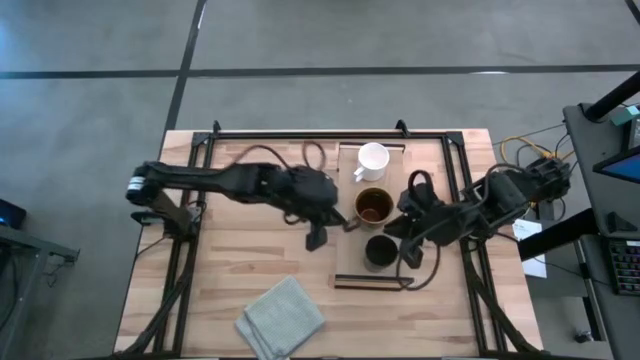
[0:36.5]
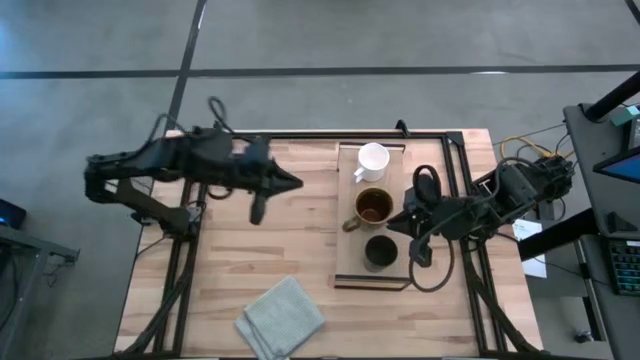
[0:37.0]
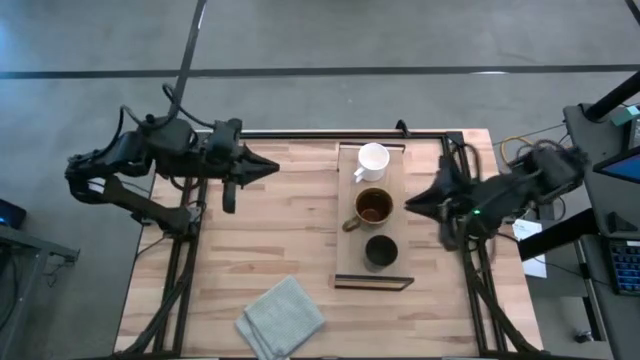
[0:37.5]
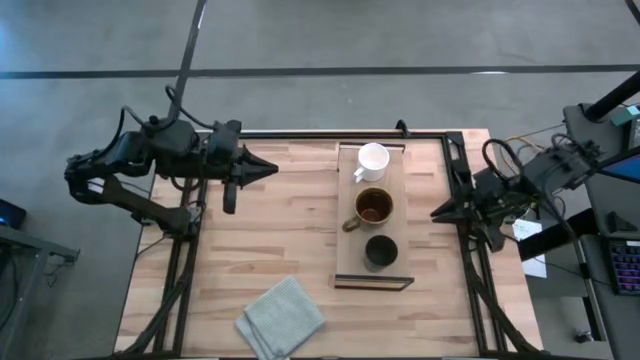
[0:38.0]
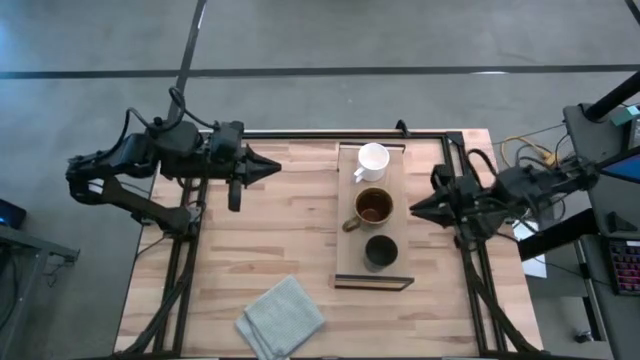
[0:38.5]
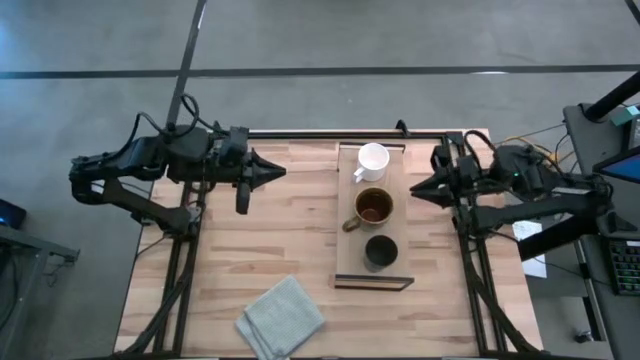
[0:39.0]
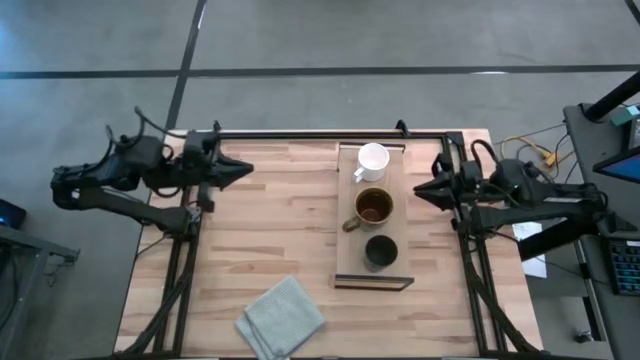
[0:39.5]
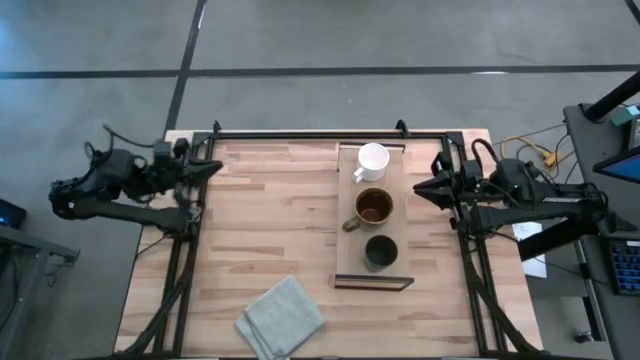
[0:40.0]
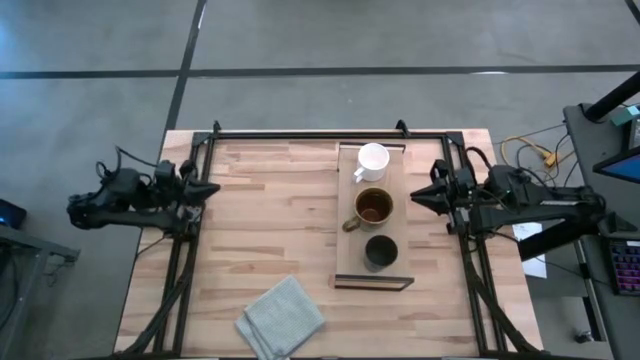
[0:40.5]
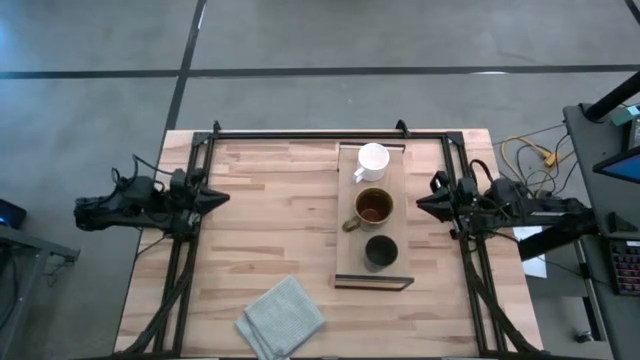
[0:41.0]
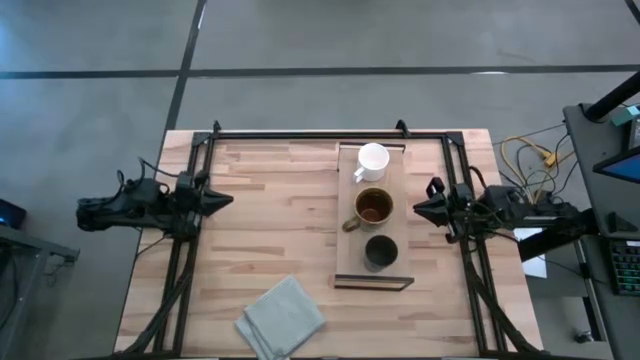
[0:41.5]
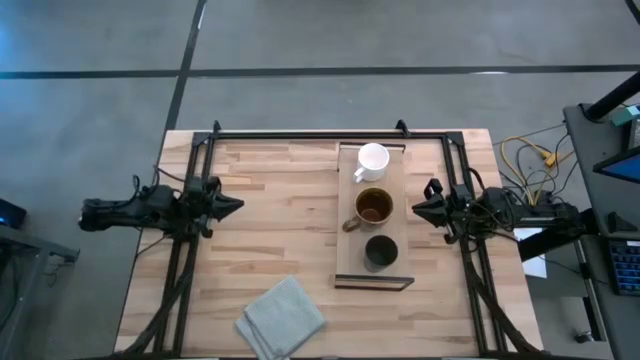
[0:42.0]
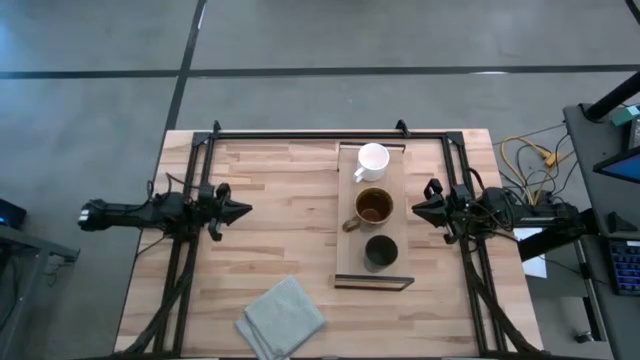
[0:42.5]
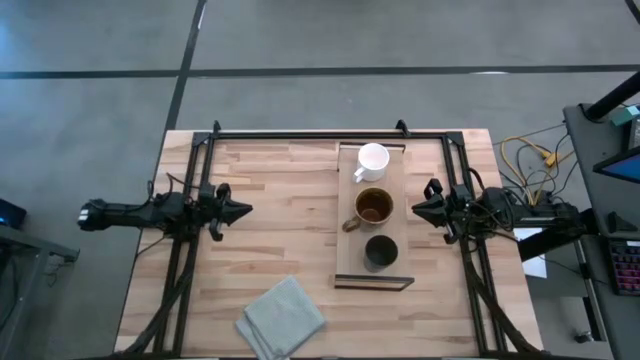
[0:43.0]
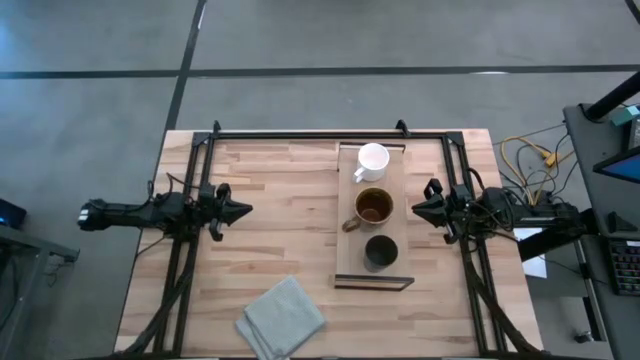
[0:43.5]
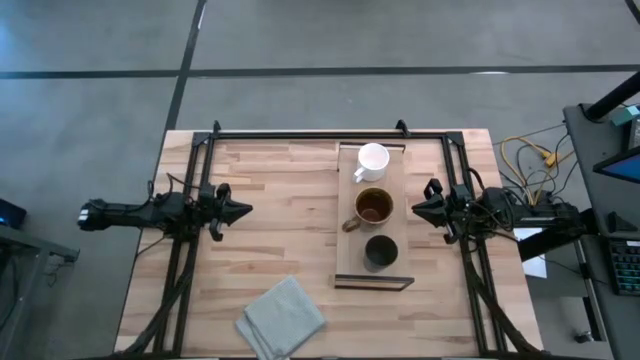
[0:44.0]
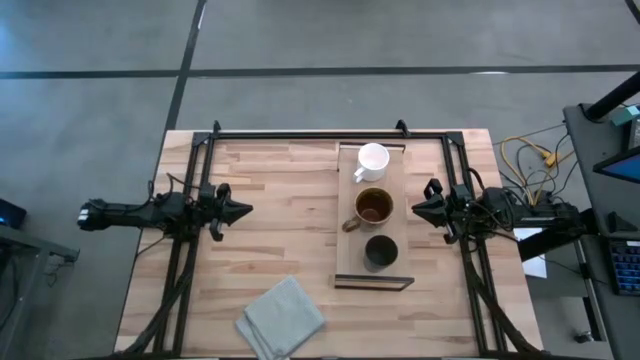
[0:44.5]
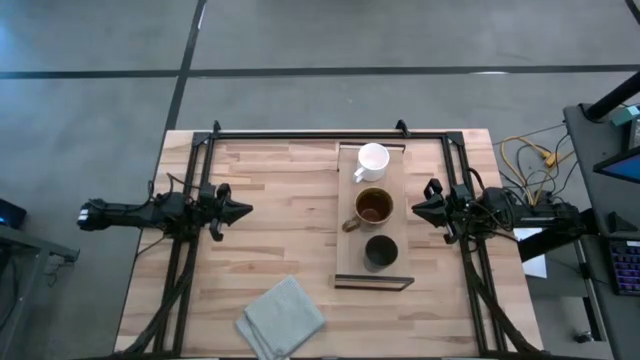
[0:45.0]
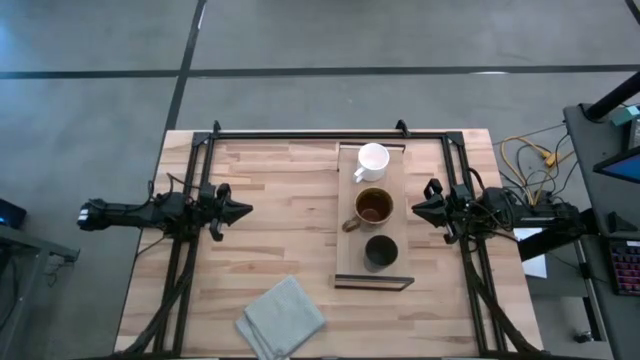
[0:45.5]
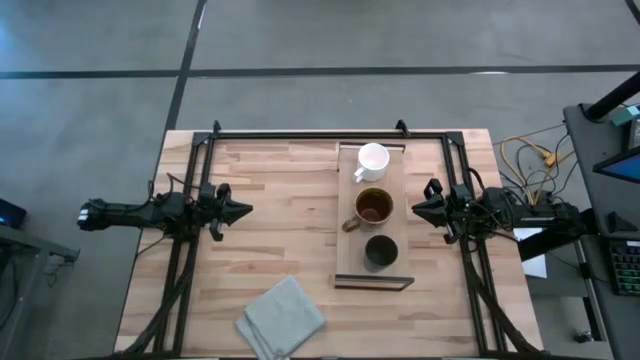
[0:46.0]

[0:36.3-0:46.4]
Task: Stack small to large cups/mugs on shelf
Return to Home Position

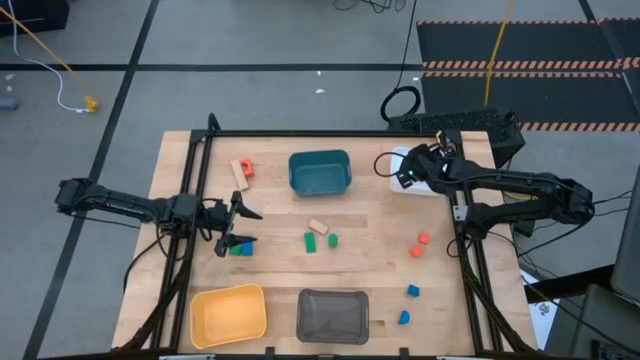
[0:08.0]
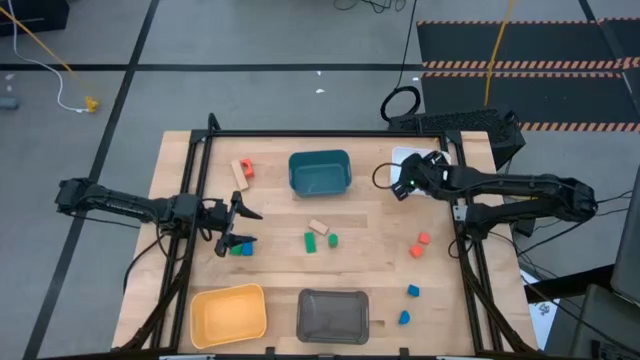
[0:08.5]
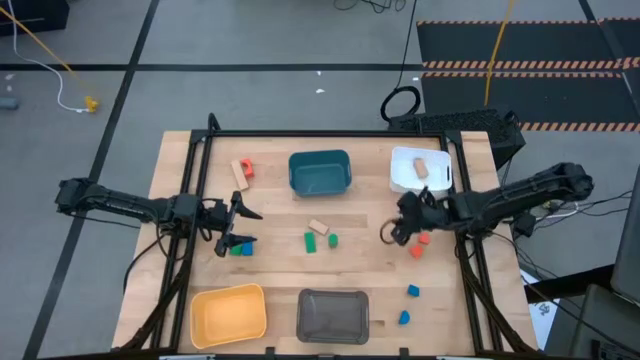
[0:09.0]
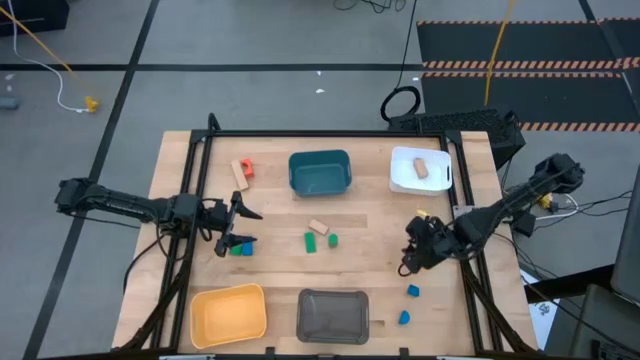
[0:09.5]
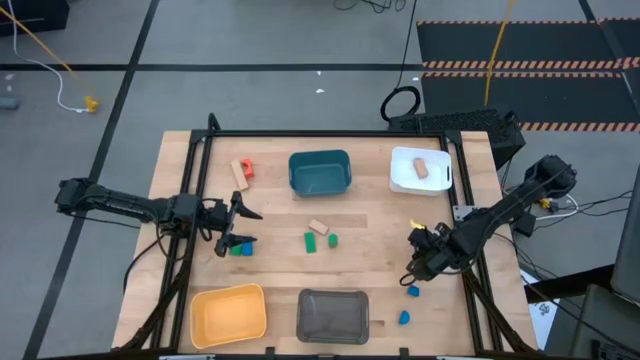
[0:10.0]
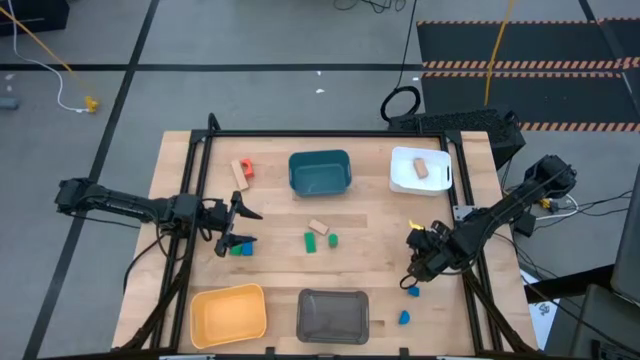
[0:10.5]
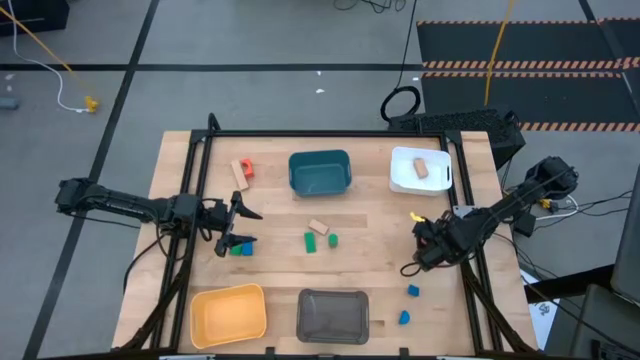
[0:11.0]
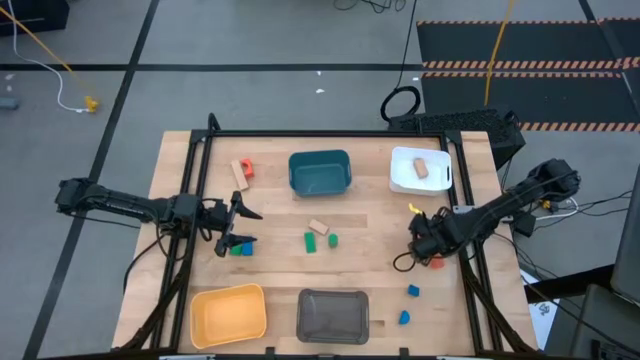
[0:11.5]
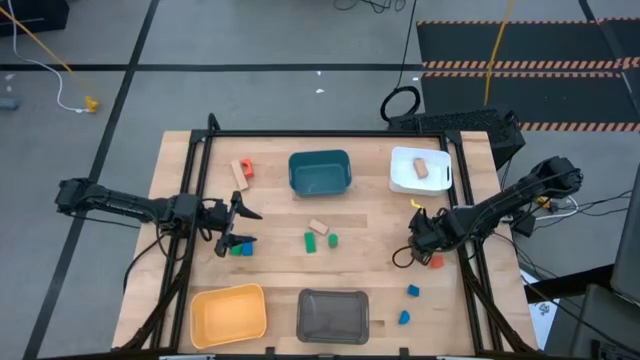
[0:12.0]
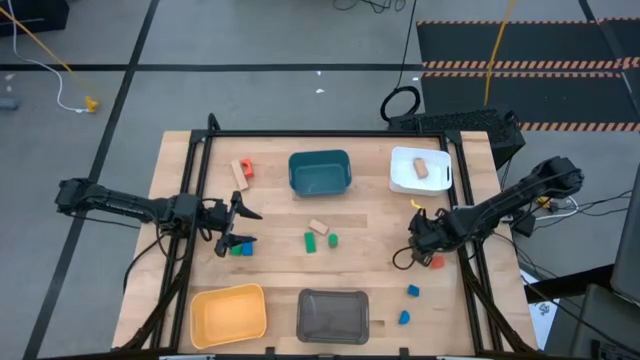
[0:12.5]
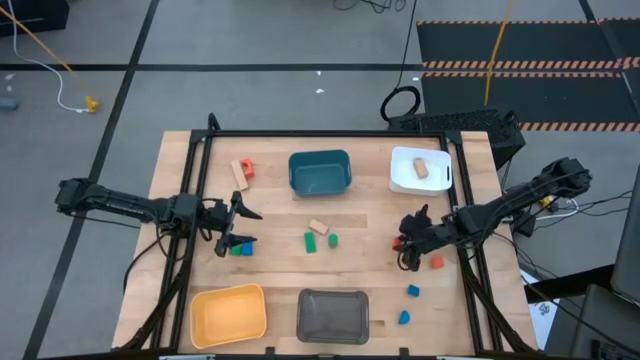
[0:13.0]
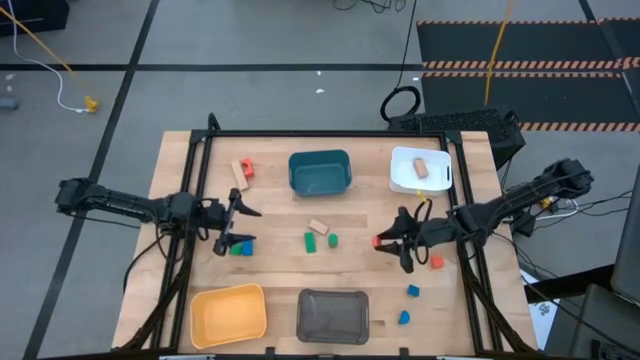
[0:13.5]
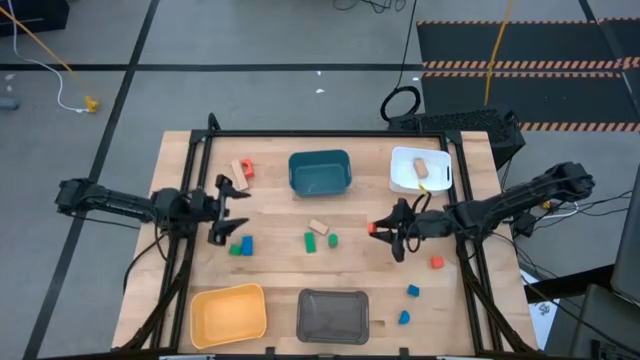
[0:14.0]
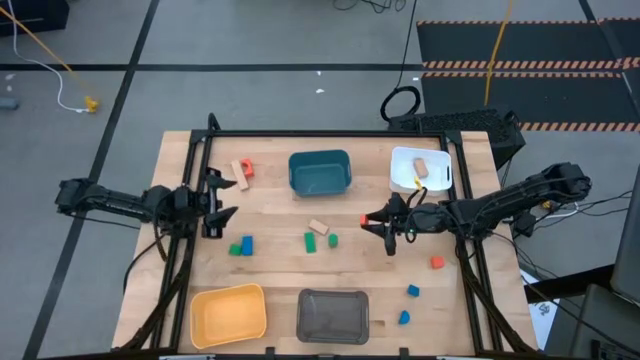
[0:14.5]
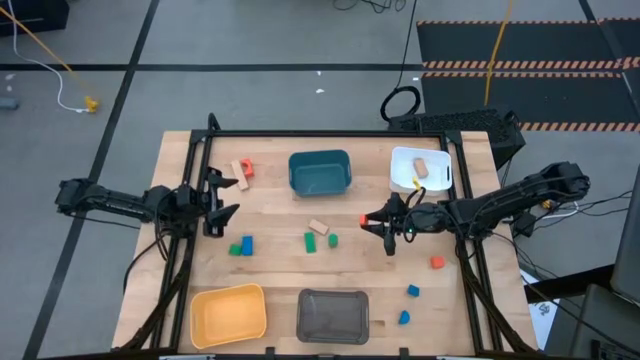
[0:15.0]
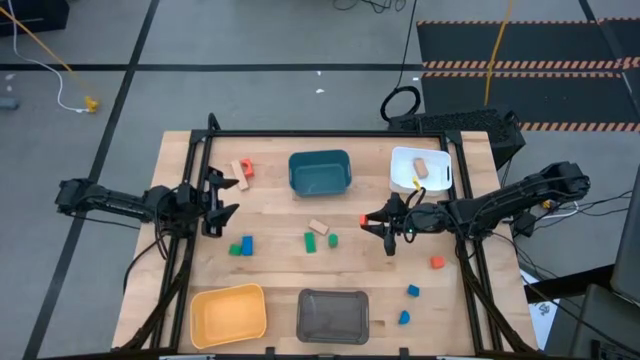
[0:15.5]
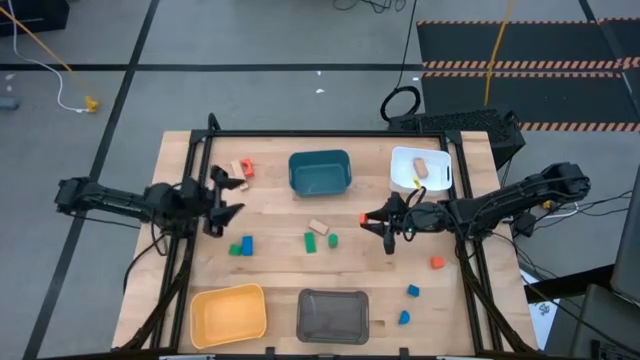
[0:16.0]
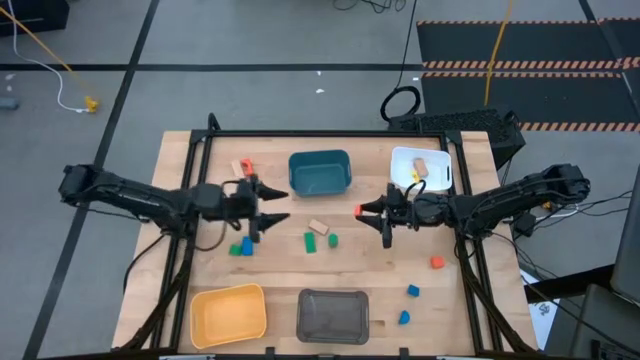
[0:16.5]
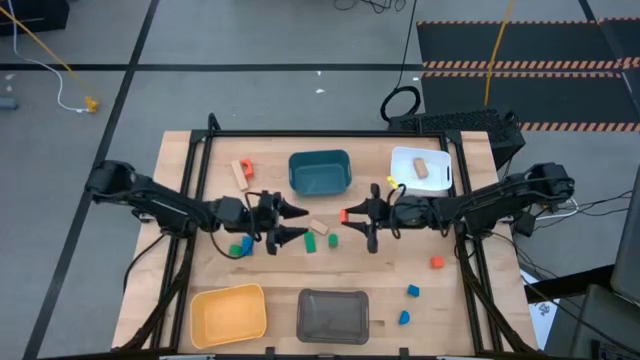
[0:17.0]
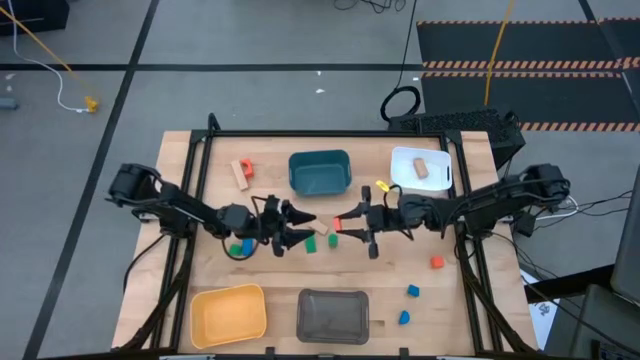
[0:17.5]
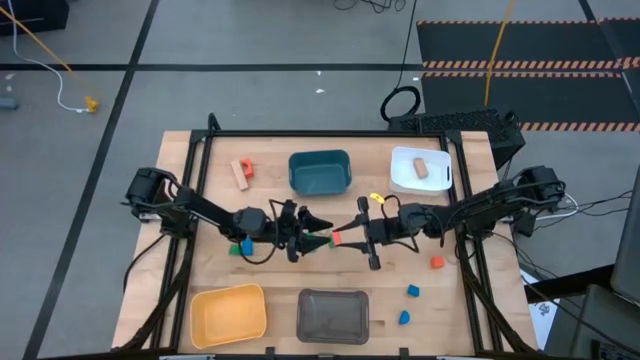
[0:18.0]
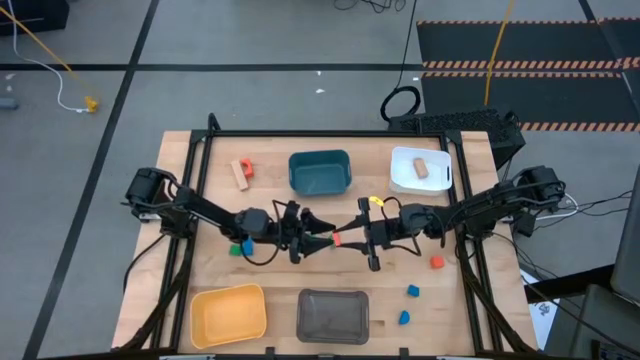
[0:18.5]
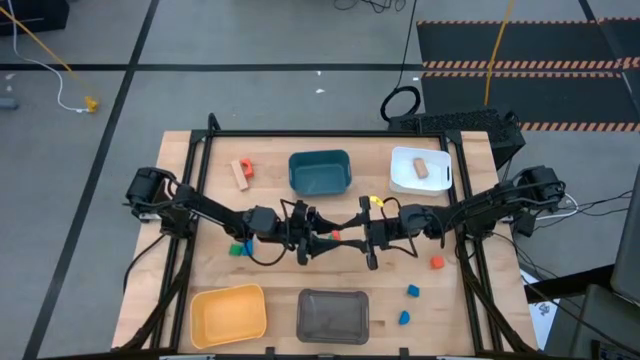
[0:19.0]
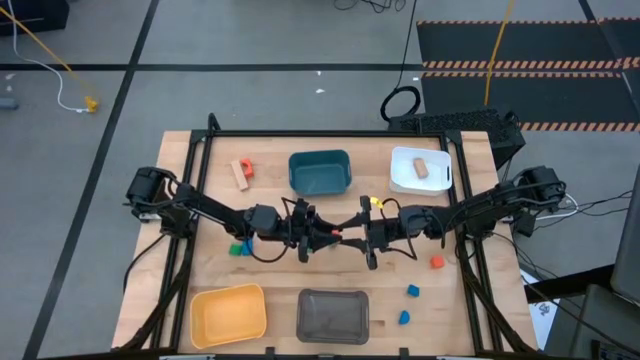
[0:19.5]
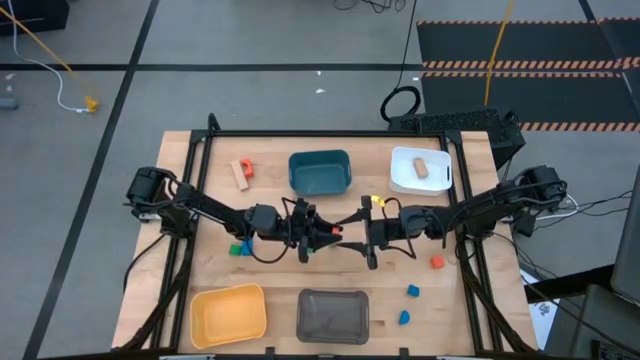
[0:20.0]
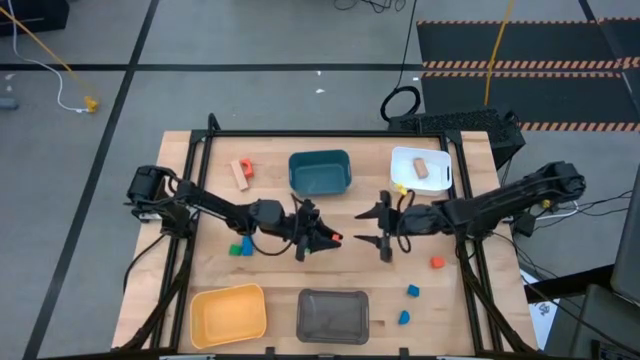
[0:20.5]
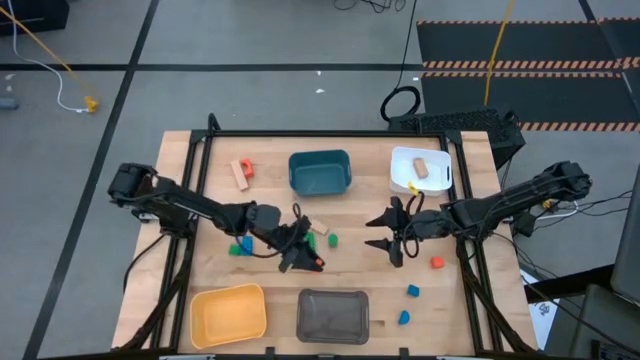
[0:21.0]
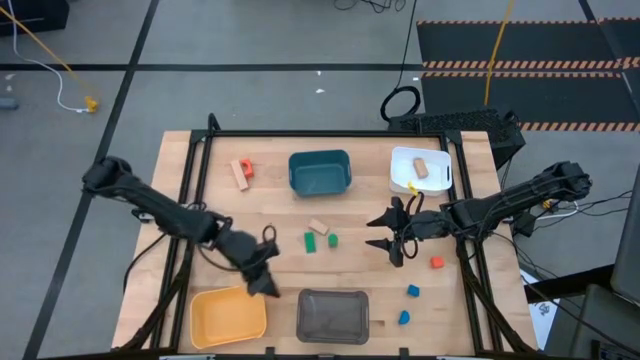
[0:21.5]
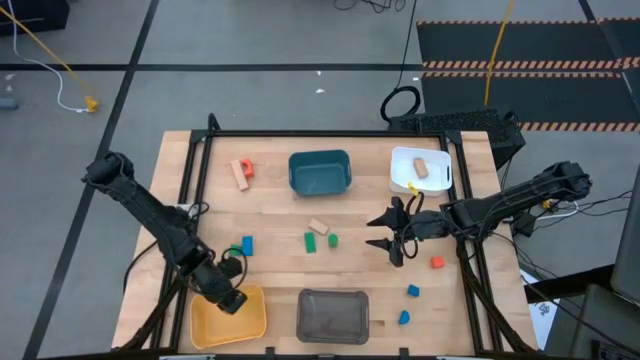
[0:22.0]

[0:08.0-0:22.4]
Task: Sort & place blocks by color
Put the bottom right orange block into the yellow bin
